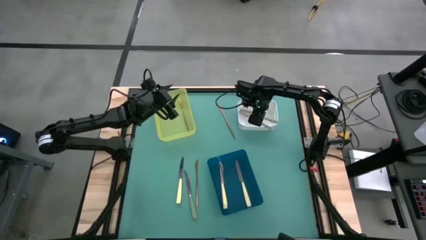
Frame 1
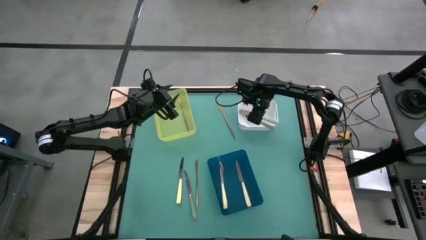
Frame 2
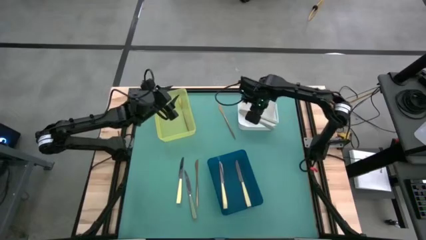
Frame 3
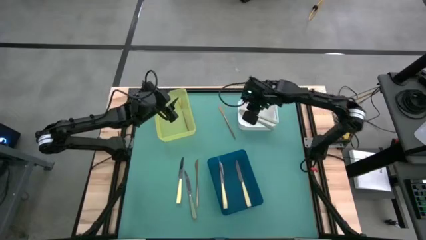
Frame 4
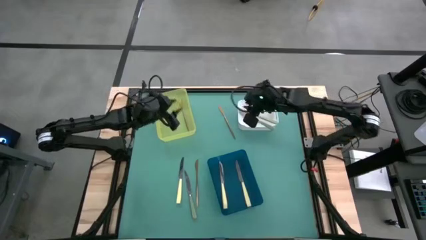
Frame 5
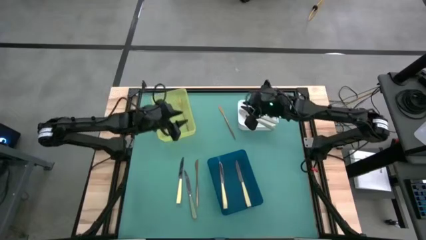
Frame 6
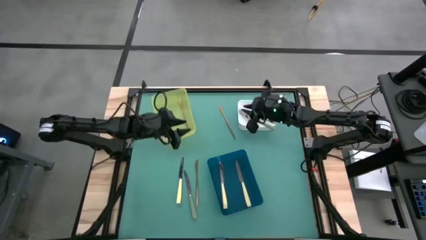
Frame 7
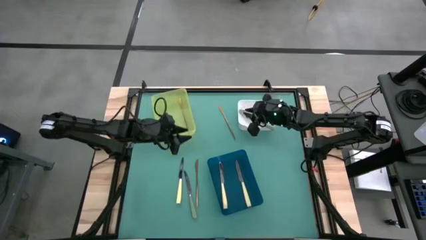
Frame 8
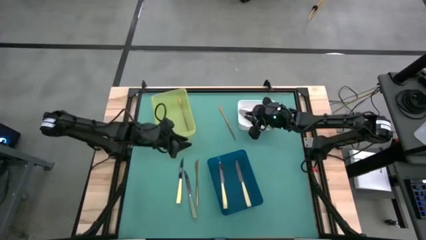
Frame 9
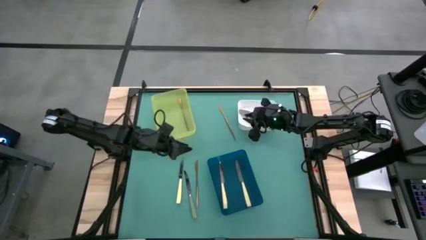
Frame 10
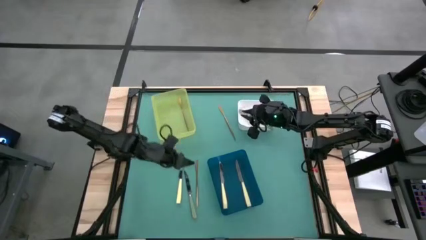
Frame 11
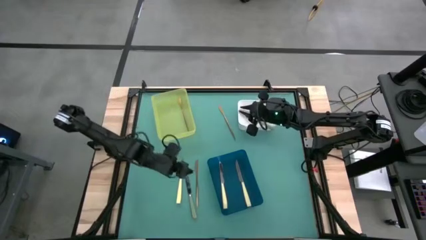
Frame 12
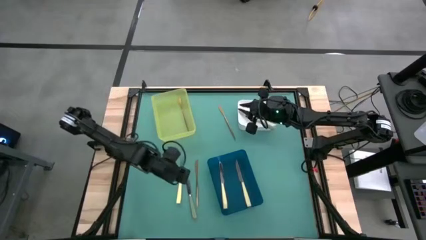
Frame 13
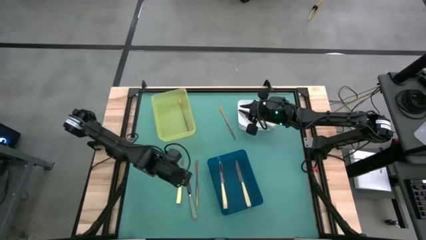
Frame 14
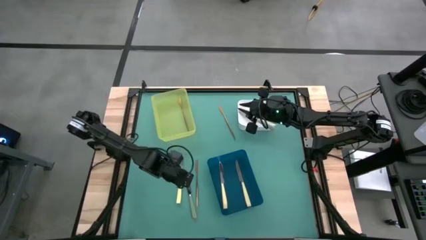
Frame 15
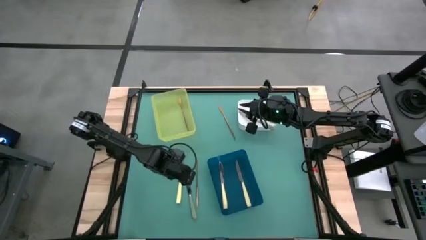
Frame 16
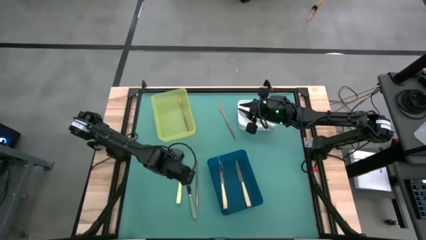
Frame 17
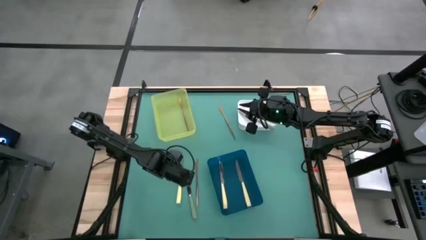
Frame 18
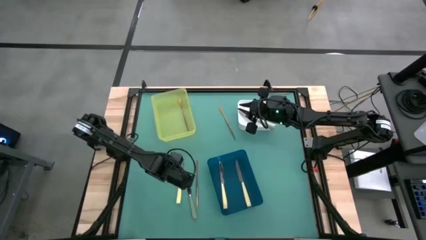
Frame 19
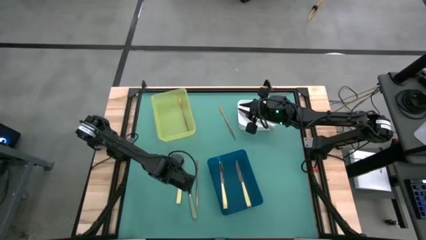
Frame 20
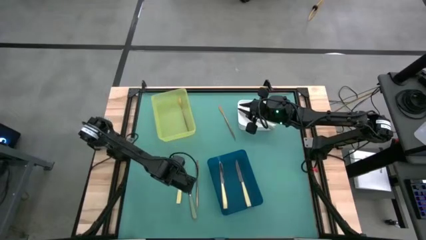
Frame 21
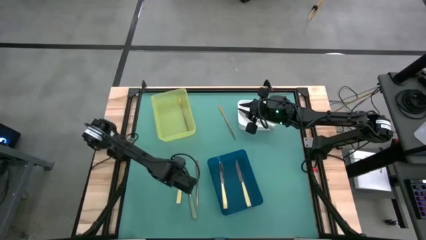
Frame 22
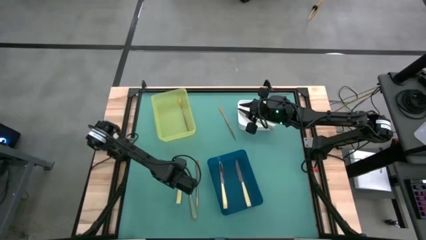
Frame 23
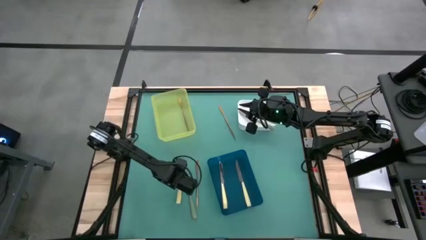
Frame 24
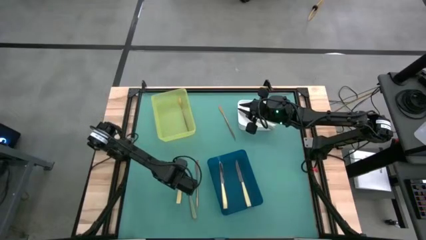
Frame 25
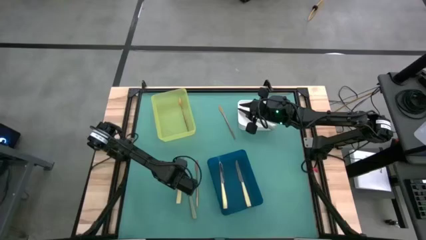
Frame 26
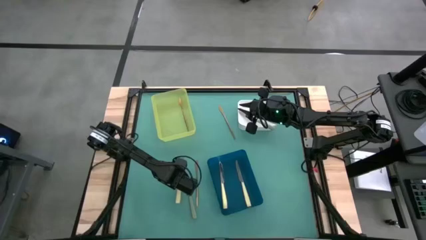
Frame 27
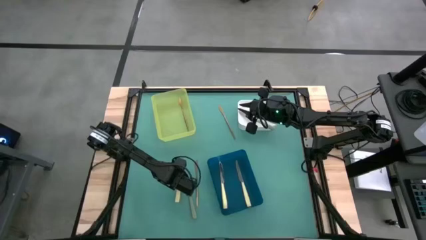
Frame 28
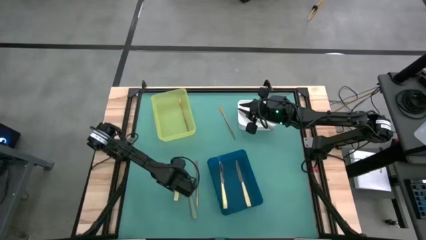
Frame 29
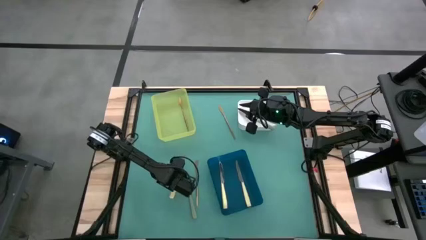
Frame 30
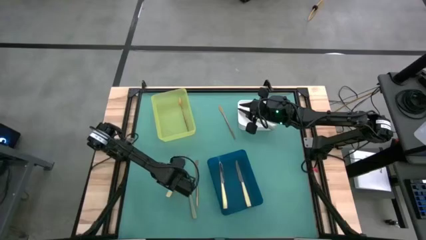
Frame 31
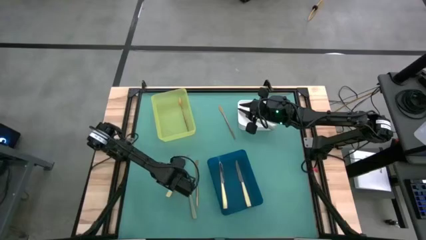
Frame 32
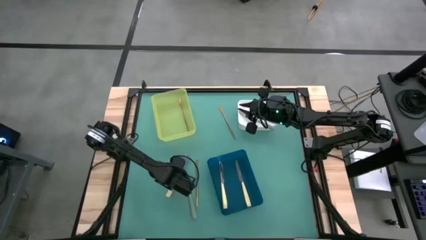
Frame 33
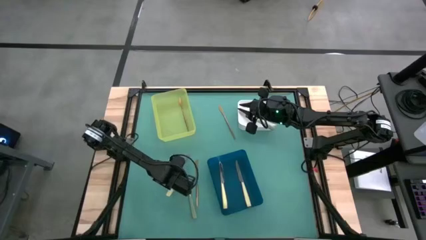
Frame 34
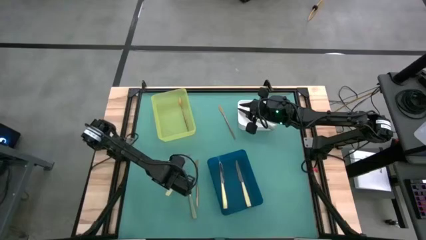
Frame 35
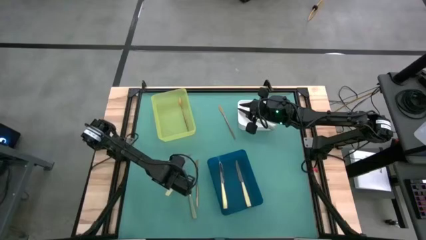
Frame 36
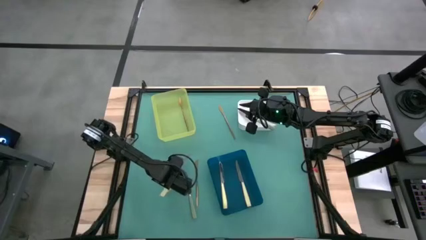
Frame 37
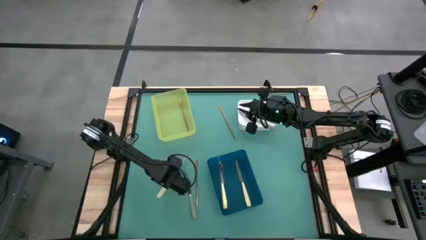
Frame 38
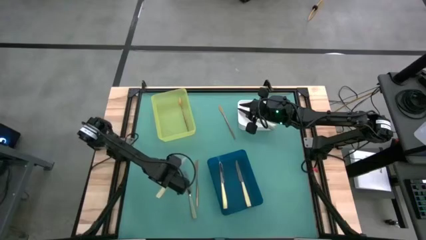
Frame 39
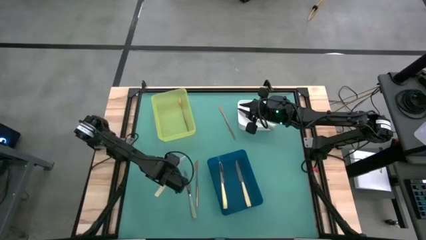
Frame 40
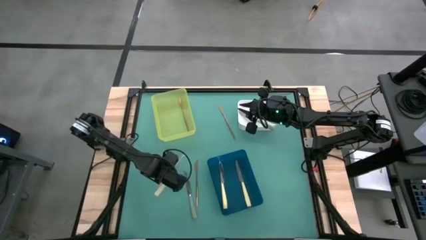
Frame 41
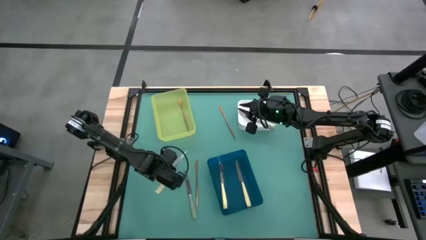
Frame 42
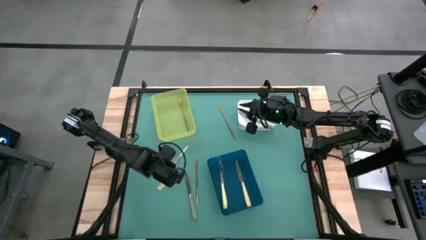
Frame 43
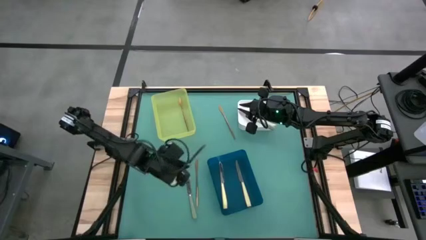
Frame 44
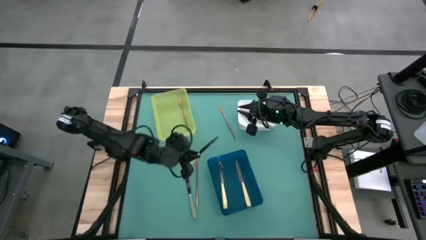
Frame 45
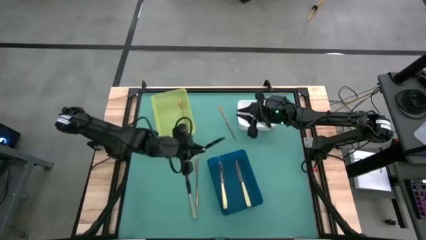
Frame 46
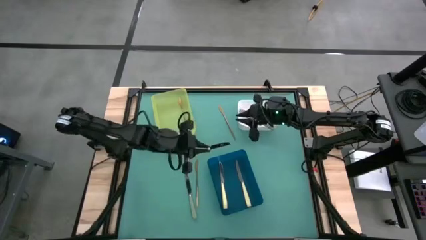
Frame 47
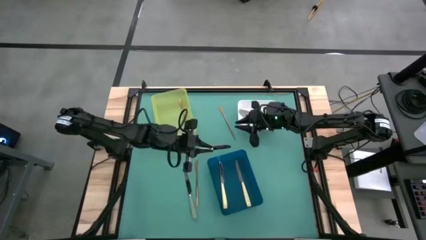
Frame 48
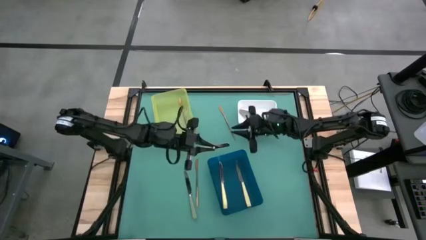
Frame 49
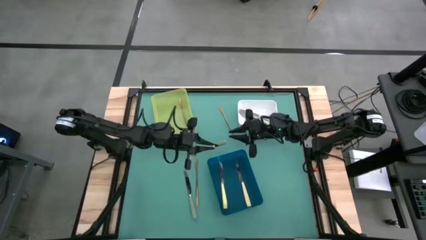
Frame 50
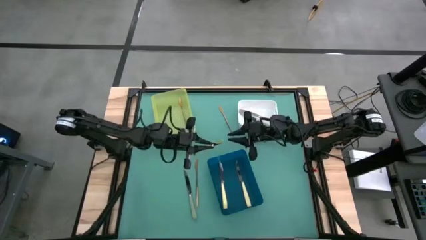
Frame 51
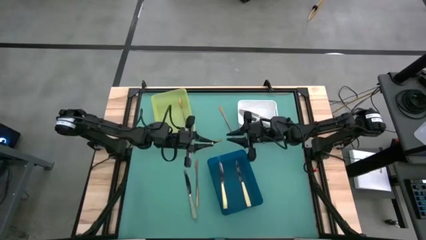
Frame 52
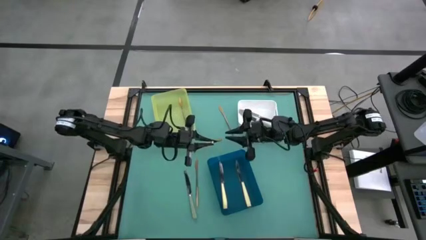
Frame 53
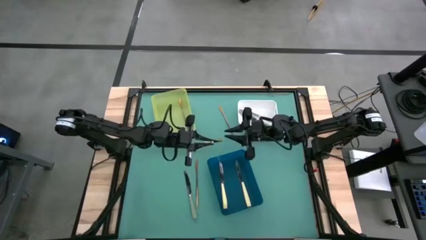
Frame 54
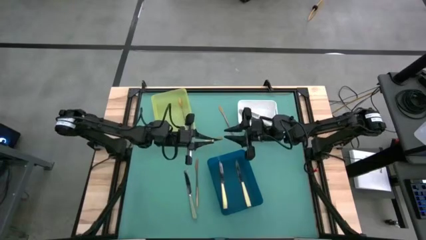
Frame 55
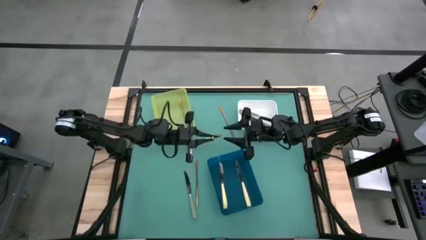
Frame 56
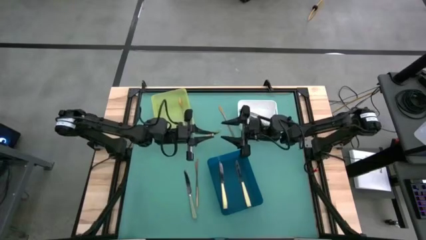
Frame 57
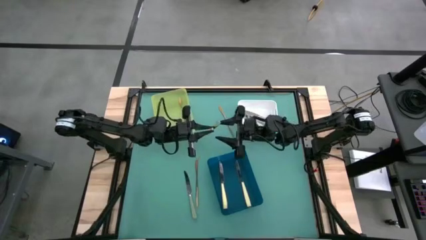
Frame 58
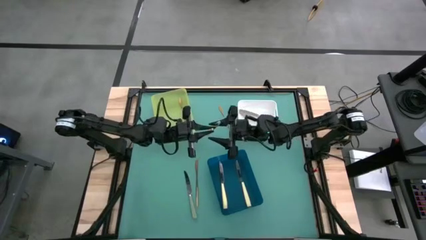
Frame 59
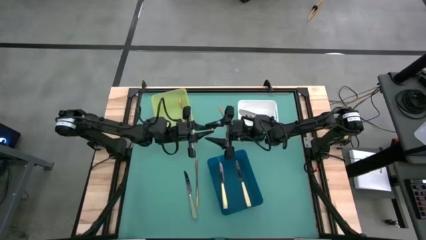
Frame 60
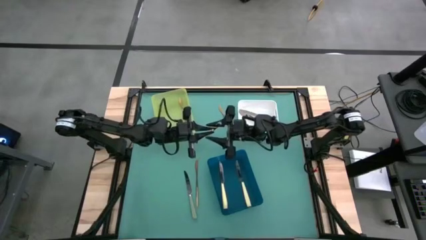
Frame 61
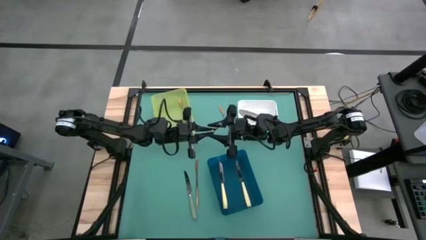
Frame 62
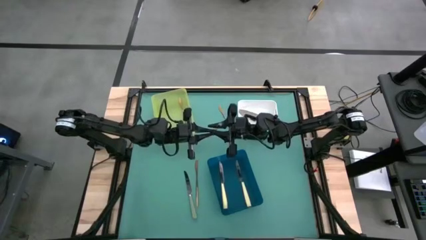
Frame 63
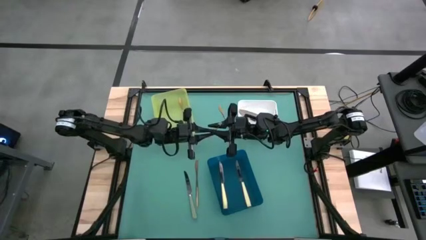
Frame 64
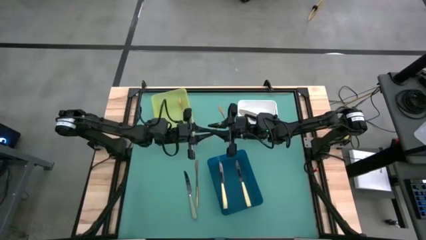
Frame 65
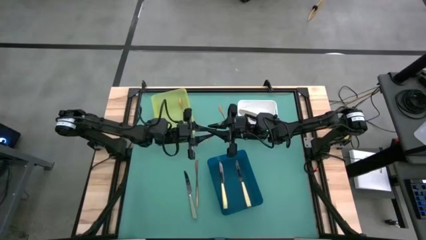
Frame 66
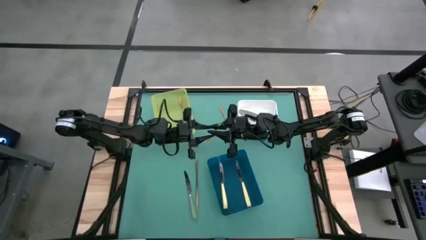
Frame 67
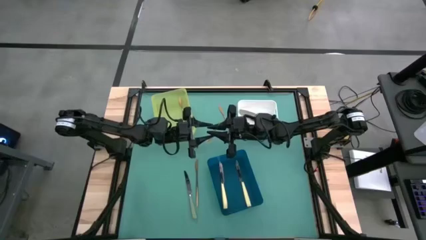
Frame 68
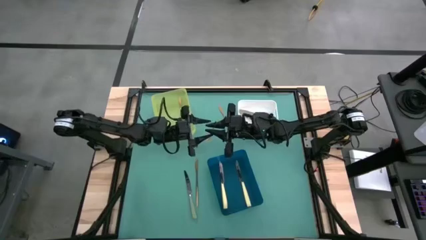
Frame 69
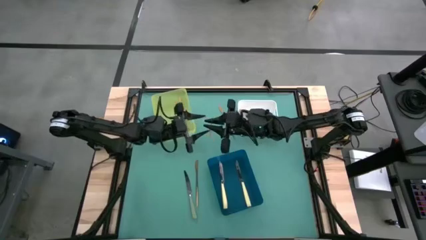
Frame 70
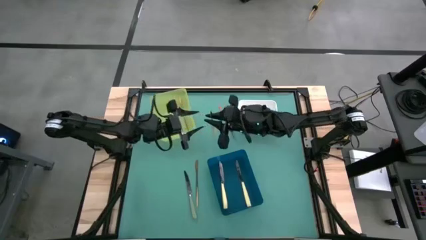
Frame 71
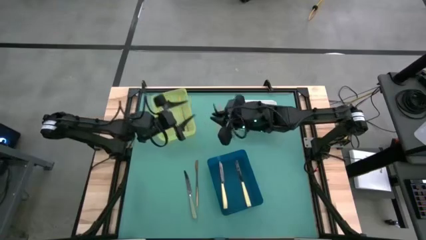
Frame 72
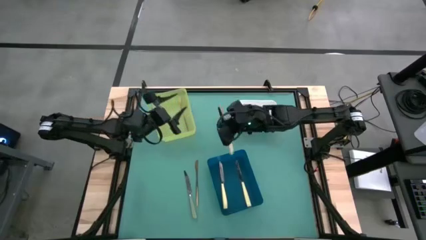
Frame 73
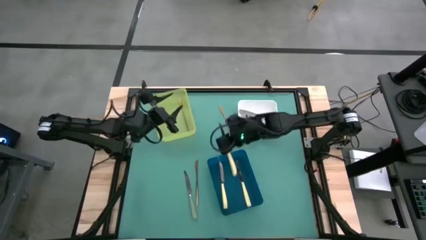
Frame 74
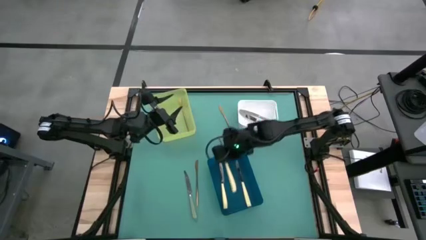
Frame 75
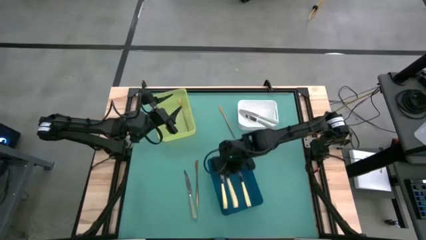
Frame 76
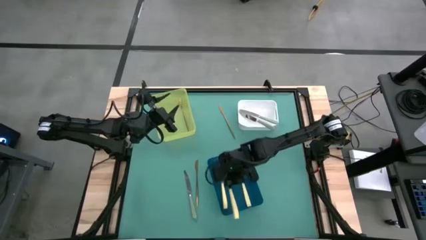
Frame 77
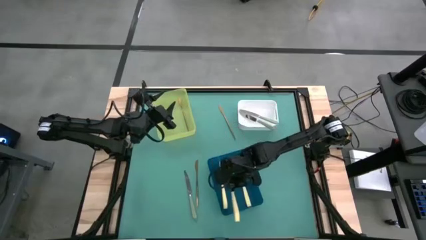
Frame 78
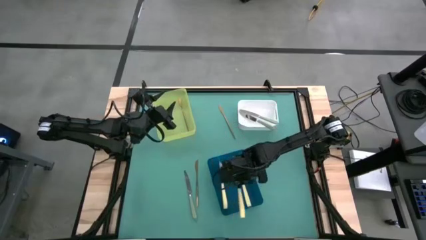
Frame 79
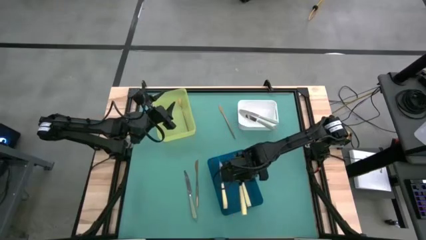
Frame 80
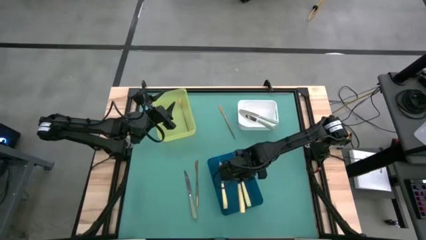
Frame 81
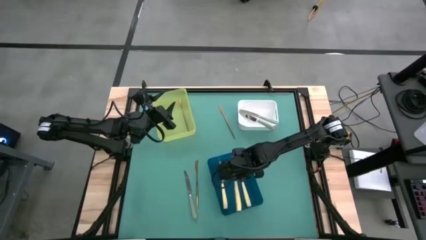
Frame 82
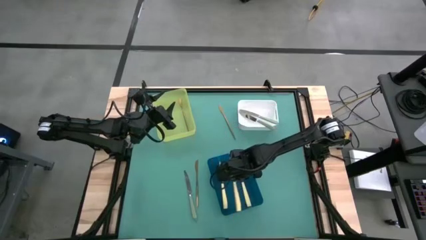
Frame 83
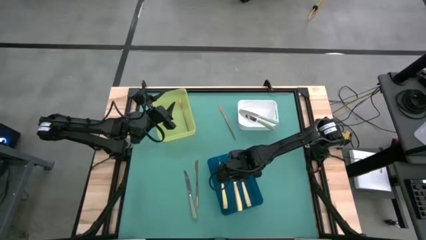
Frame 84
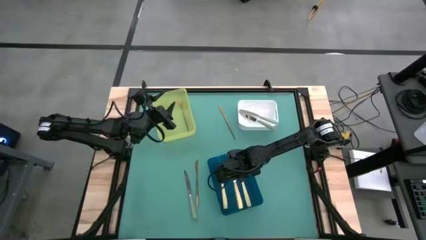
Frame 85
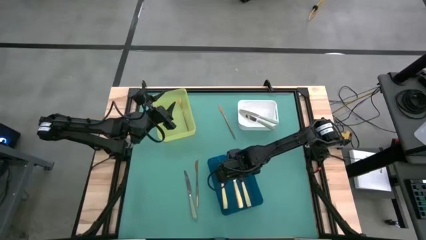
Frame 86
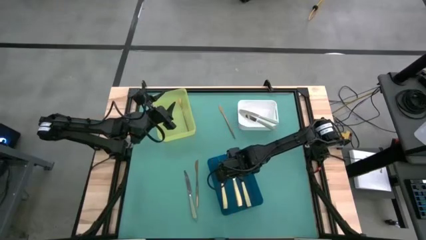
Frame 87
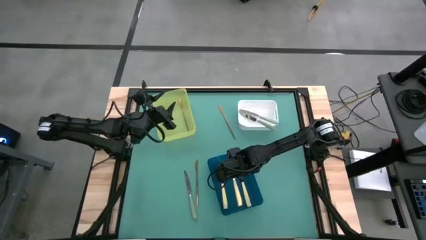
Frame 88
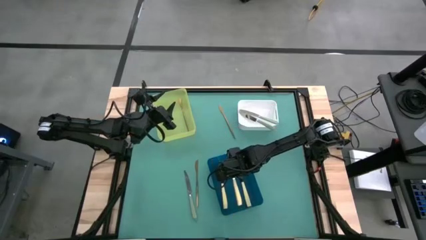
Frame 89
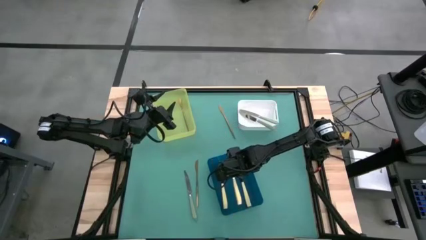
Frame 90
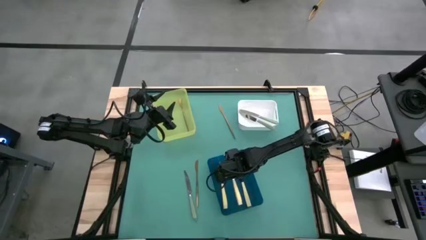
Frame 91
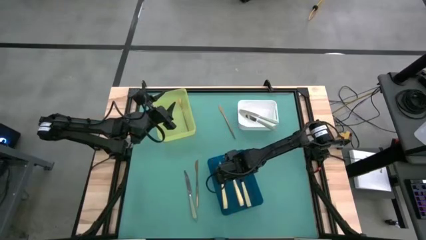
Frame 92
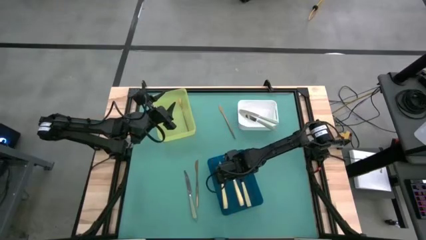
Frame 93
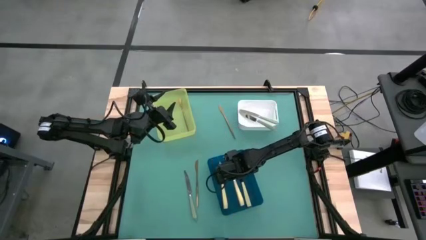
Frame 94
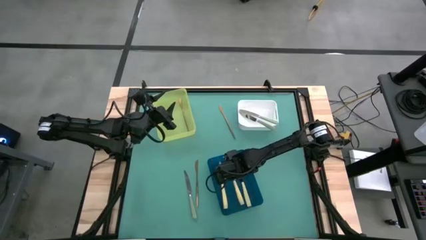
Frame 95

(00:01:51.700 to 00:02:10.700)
Task: Sort silverware by color (type)
Put the yellow knife into the blue bin
